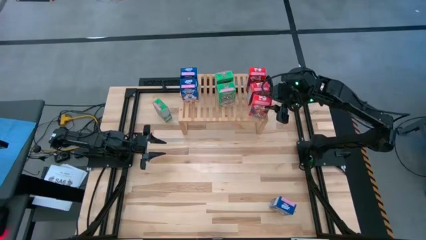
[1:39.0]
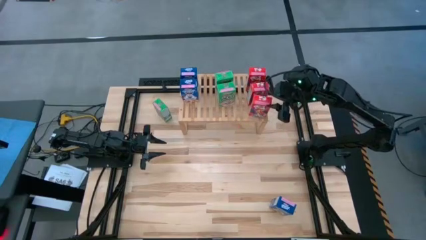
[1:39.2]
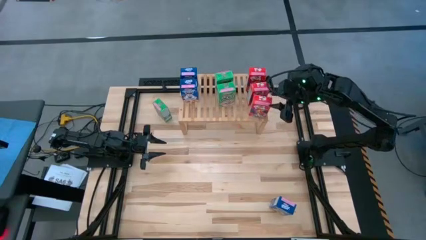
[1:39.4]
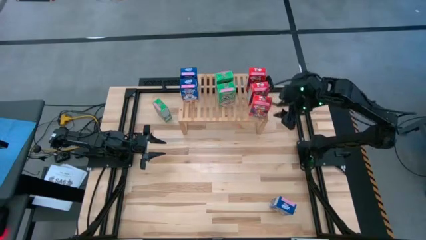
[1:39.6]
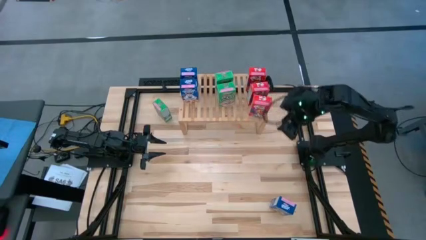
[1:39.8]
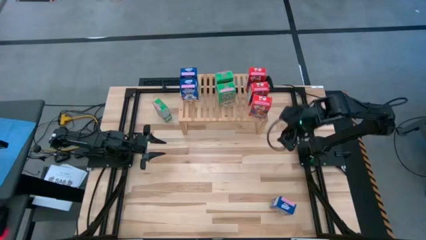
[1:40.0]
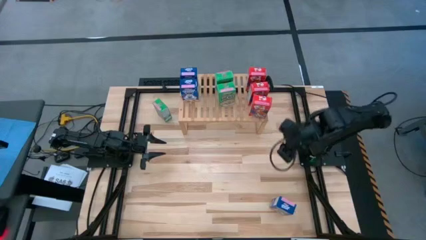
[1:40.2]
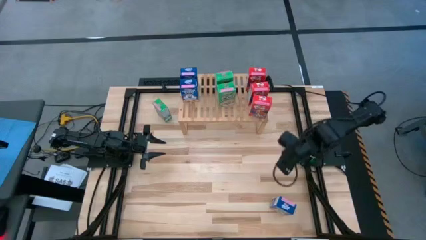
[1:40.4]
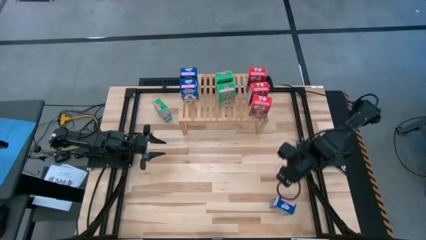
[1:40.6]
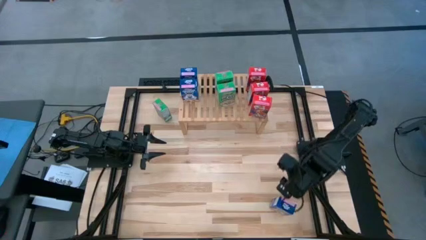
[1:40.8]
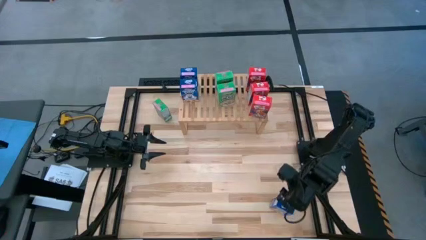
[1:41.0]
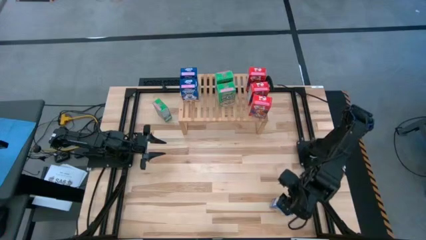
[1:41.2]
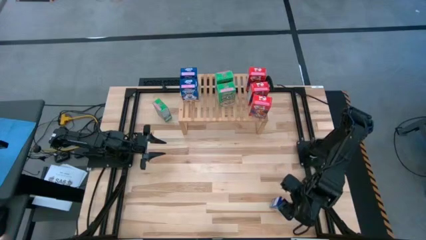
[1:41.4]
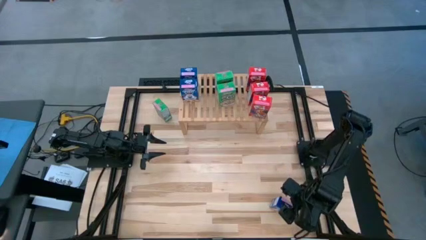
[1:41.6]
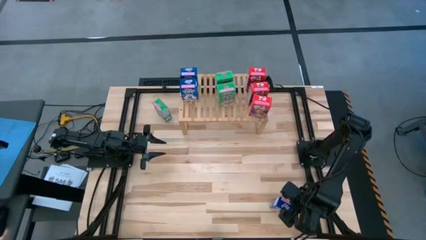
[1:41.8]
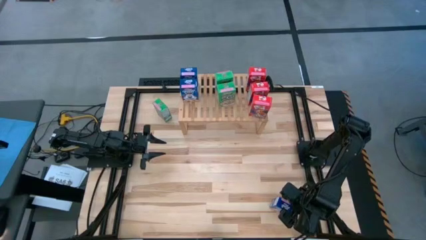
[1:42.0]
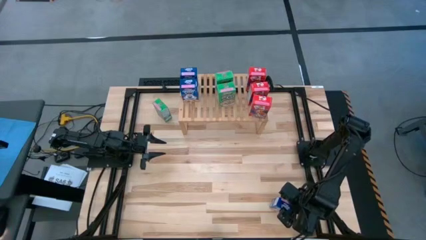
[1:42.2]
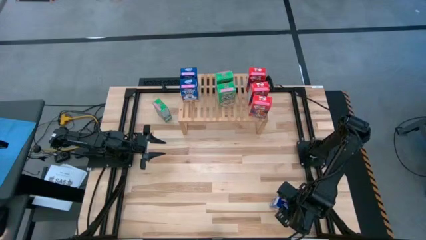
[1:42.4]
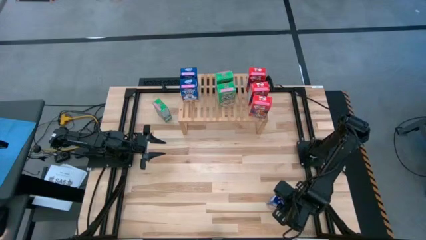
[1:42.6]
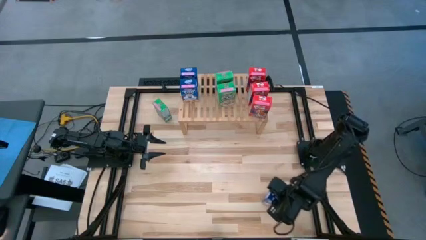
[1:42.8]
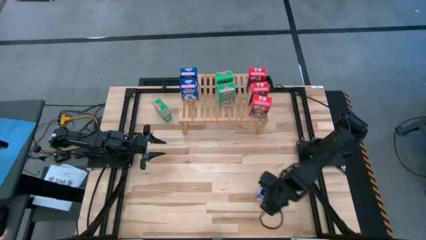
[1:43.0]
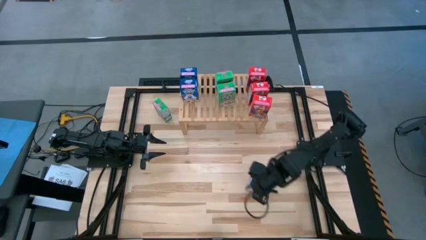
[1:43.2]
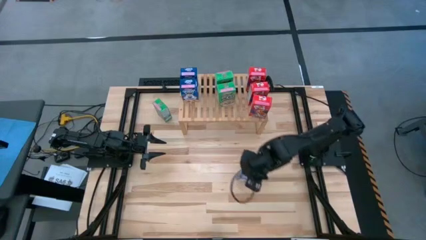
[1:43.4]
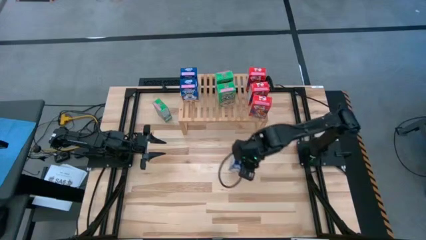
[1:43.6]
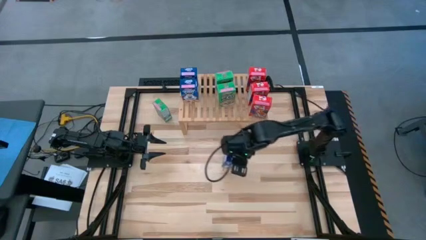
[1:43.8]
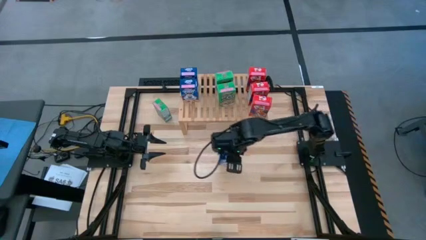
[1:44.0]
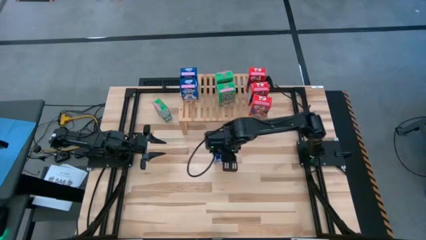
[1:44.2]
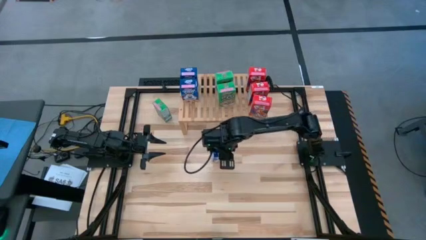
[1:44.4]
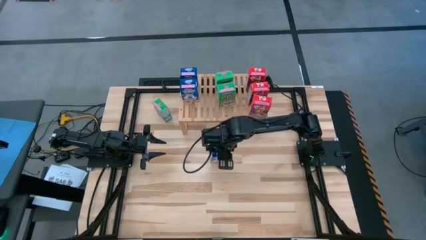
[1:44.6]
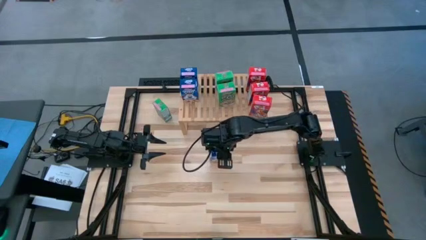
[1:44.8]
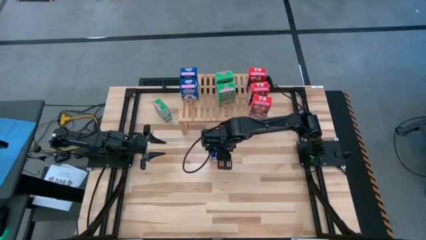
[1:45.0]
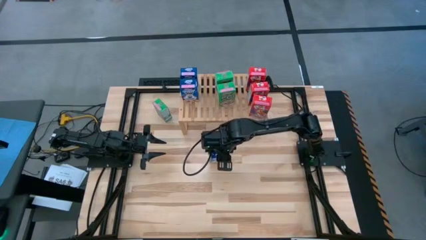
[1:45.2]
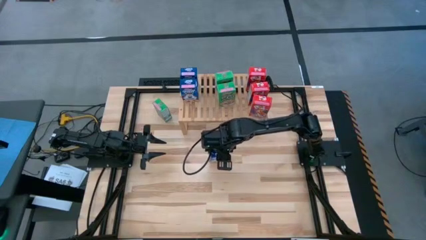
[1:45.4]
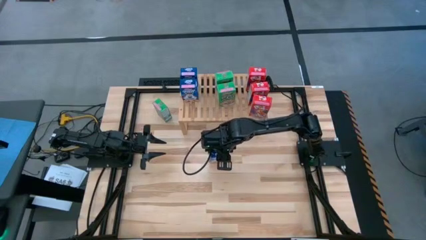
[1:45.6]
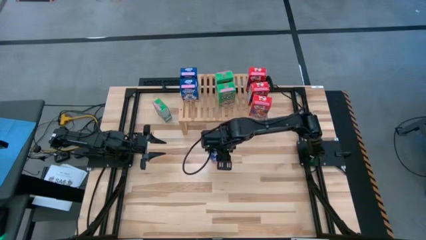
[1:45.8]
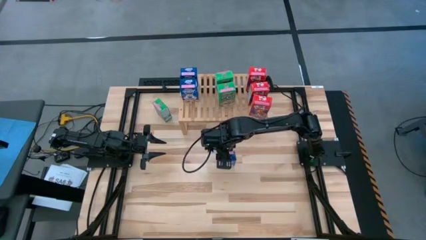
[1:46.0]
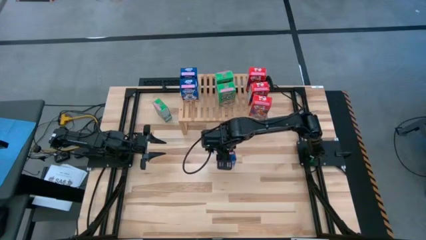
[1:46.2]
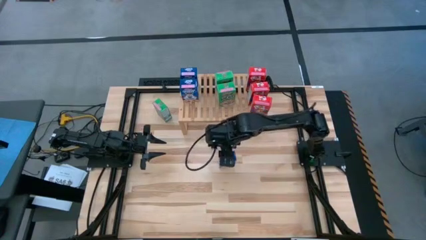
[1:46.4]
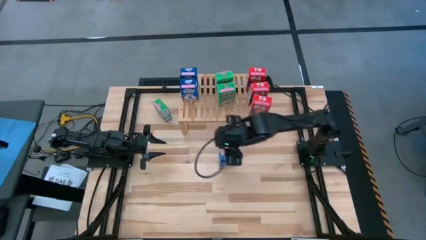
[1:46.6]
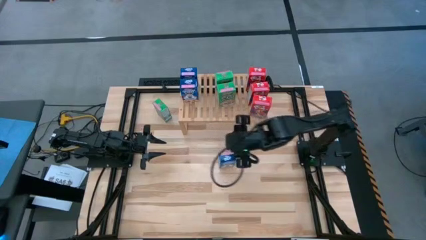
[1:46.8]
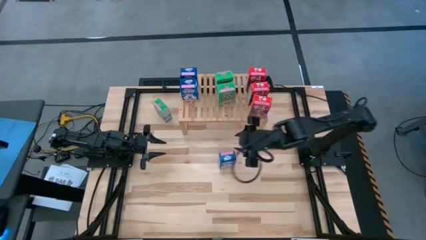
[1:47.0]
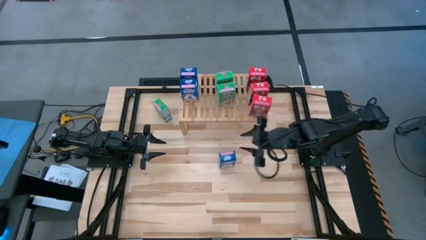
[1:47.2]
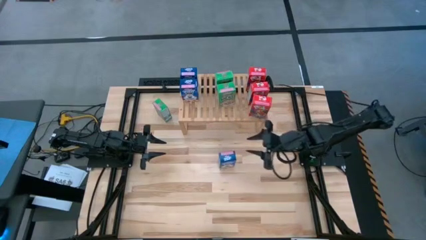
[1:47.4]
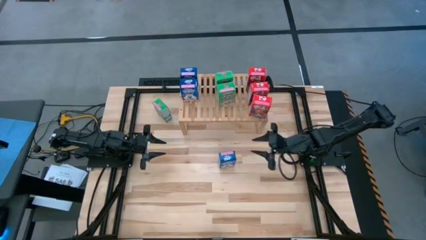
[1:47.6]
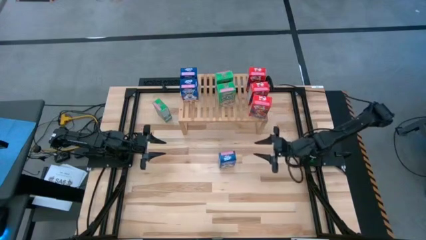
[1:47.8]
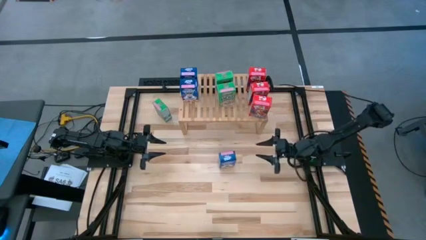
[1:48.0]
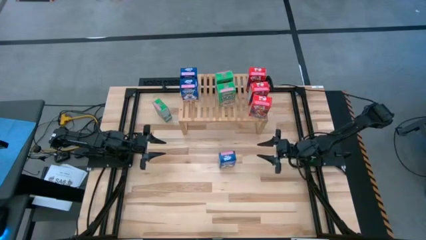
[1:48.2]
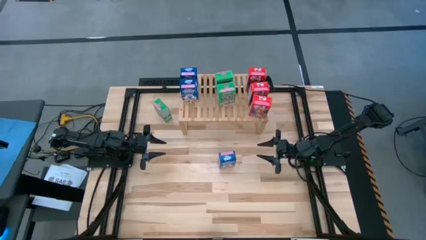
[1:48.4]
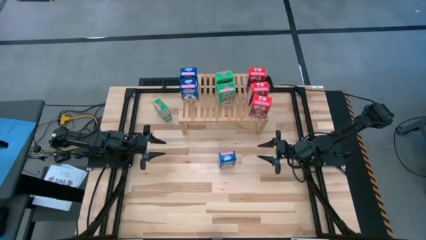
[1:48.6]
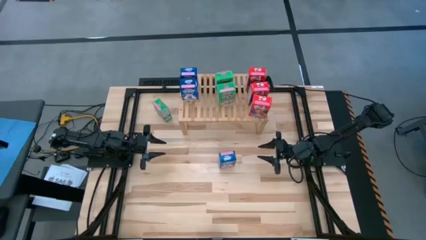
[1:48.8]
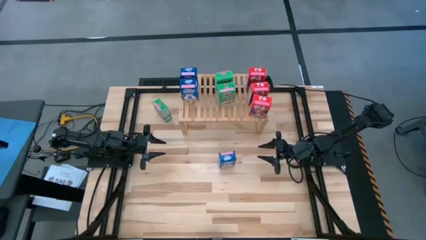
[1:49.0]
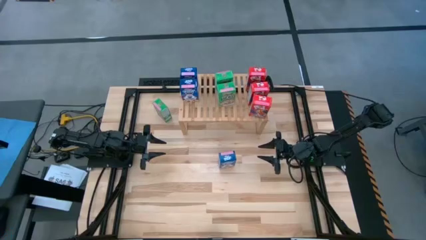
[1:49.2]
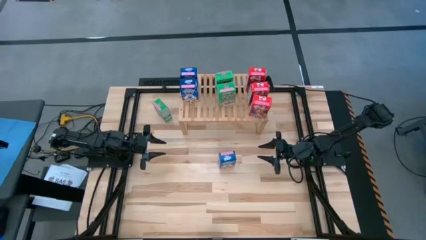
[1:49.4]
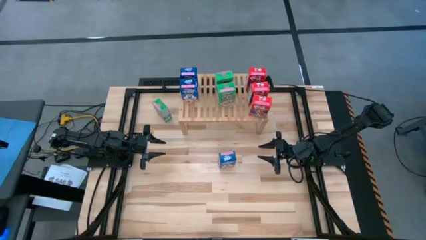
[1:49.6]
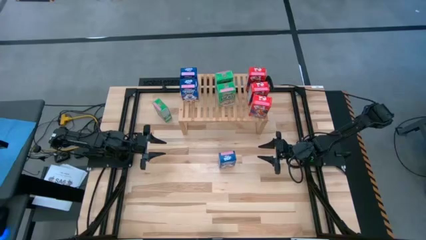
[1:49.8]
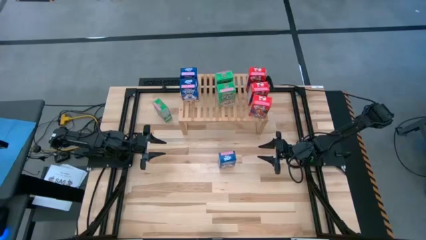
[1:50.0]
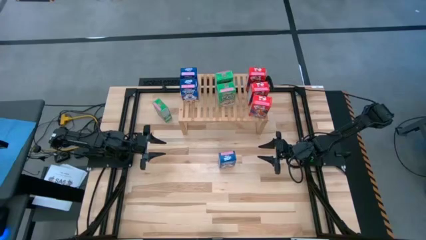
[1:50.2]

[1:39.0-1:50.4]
Task: Stack cereal on shelf
Put the blue cereal box on the shelf aligned with the other blue cereal box
